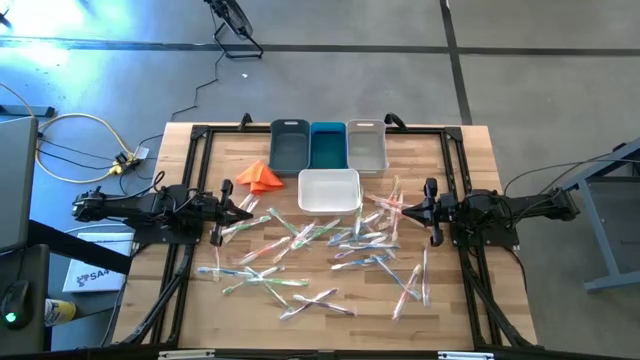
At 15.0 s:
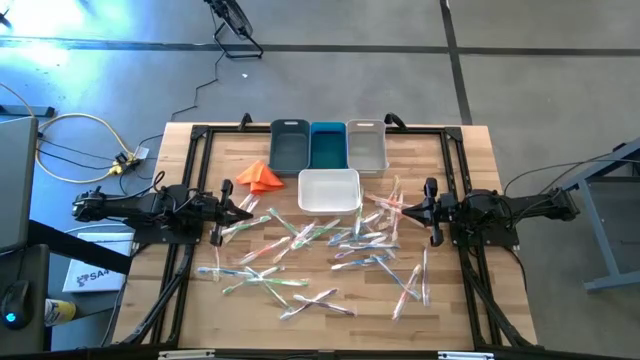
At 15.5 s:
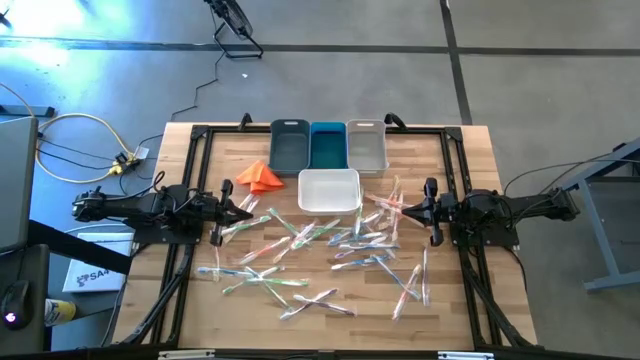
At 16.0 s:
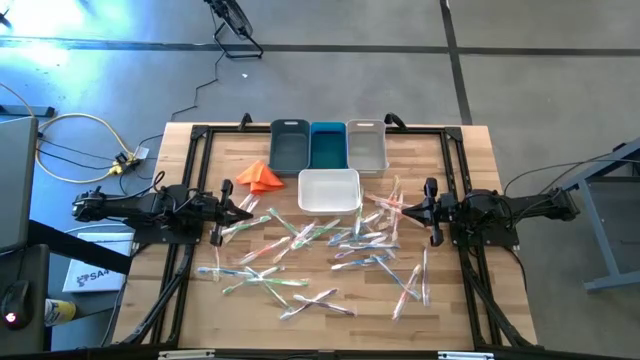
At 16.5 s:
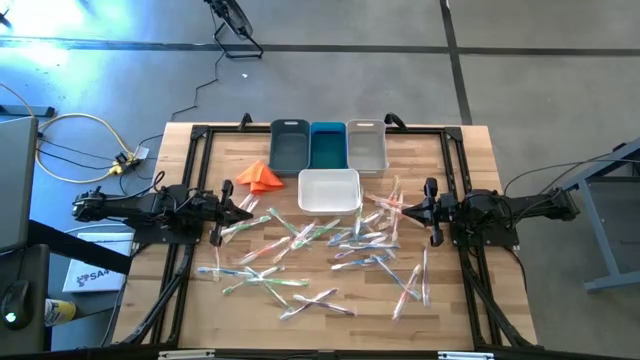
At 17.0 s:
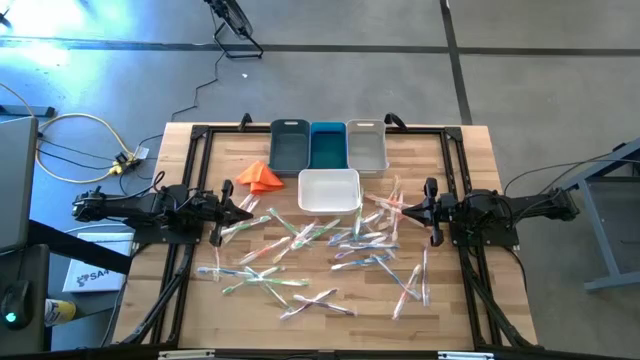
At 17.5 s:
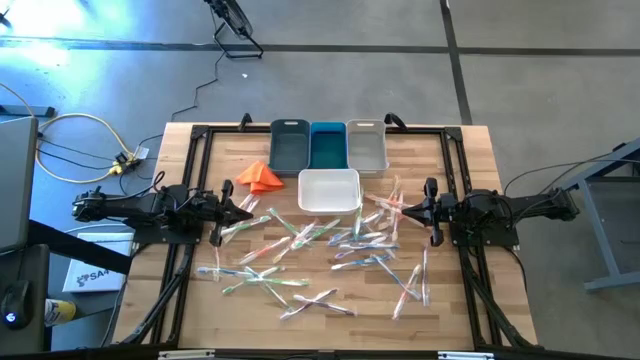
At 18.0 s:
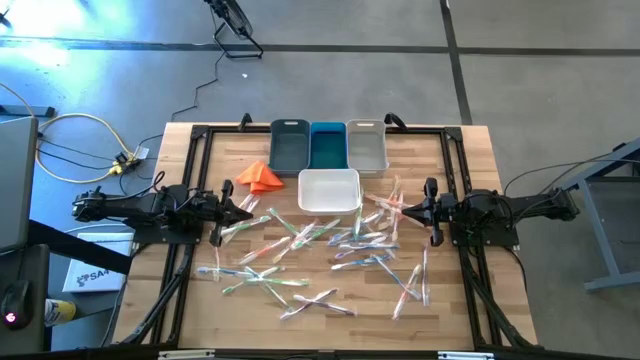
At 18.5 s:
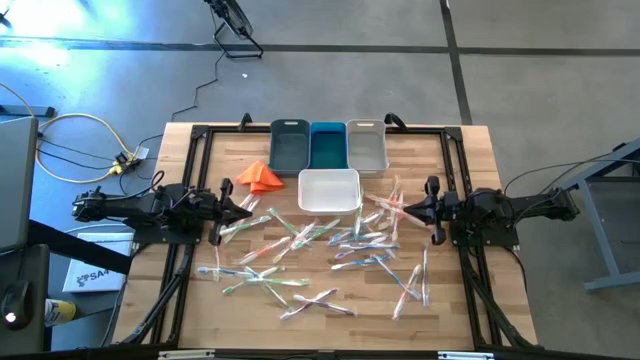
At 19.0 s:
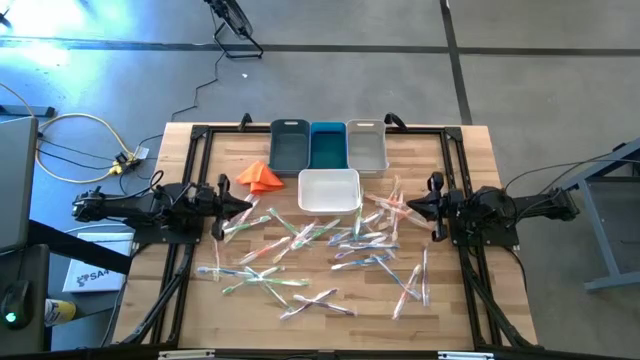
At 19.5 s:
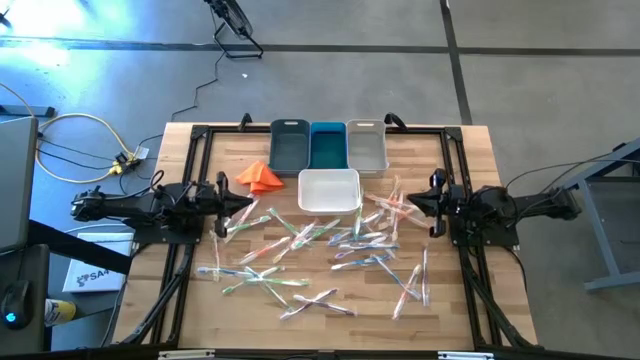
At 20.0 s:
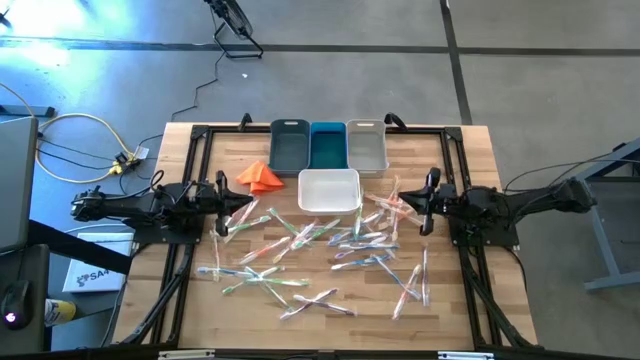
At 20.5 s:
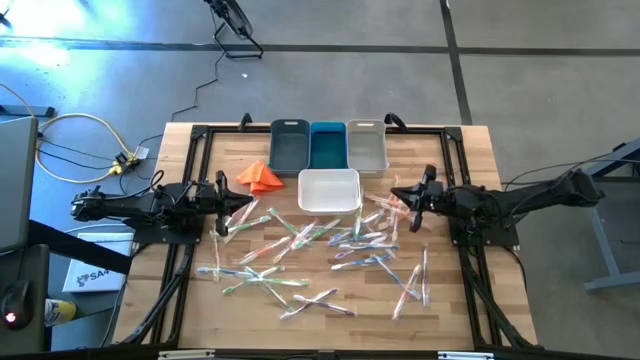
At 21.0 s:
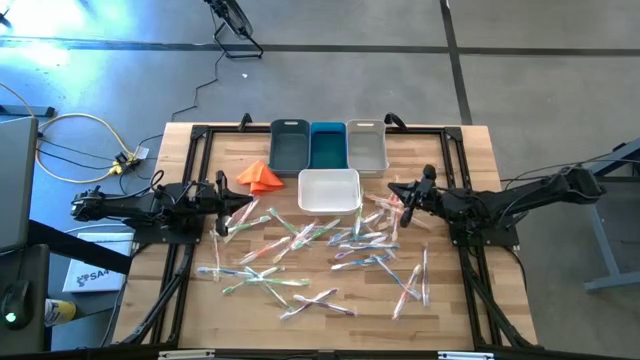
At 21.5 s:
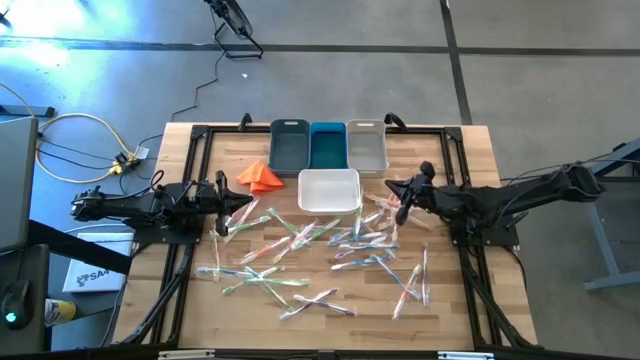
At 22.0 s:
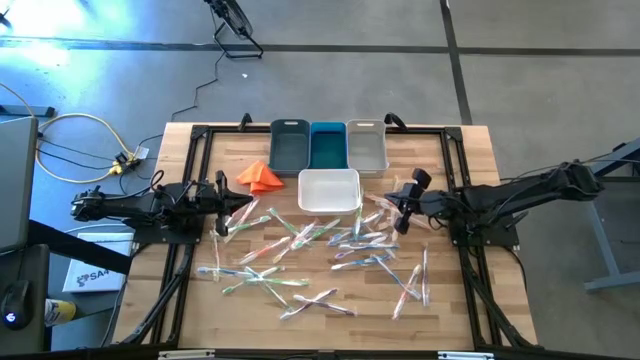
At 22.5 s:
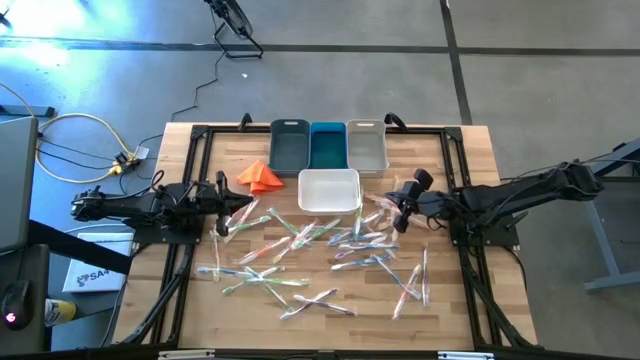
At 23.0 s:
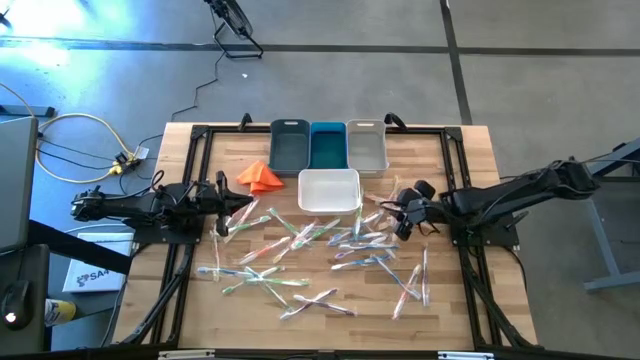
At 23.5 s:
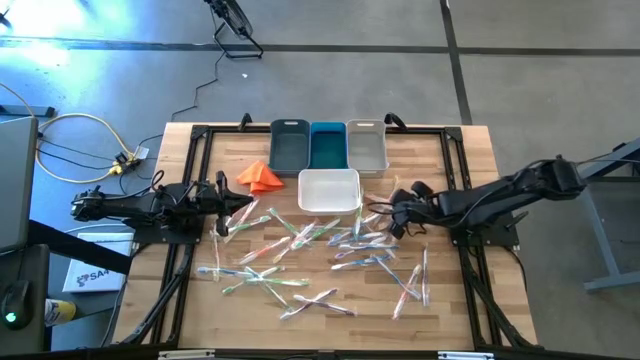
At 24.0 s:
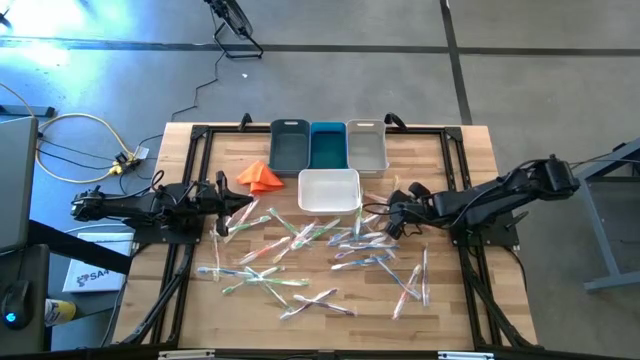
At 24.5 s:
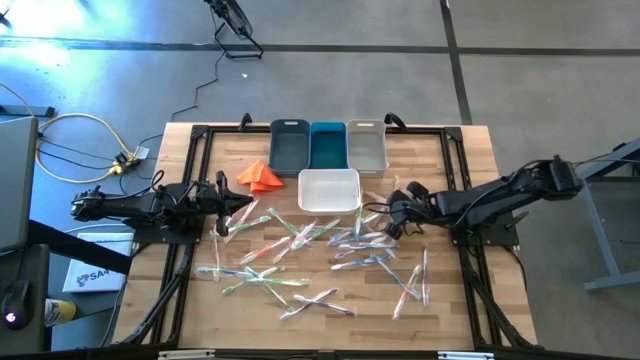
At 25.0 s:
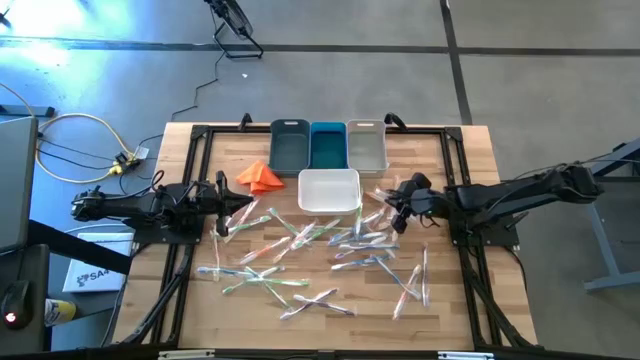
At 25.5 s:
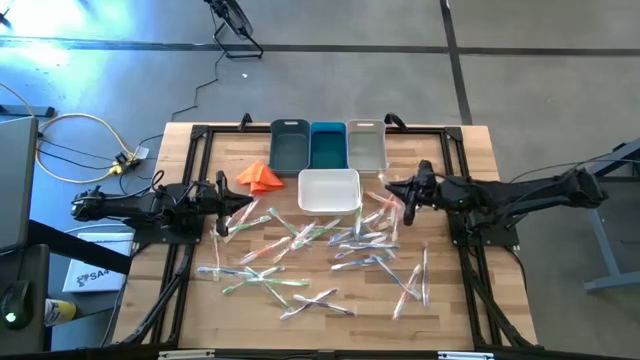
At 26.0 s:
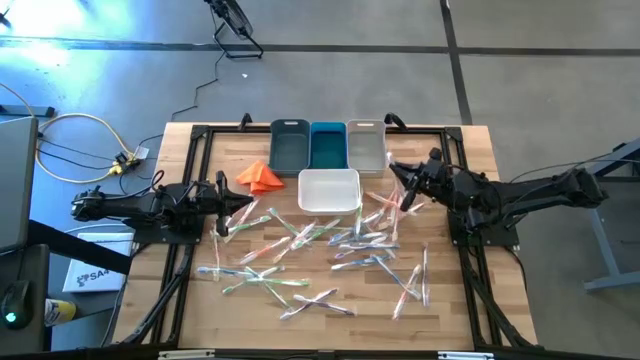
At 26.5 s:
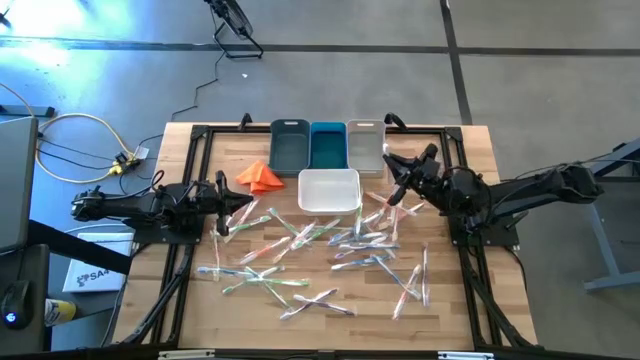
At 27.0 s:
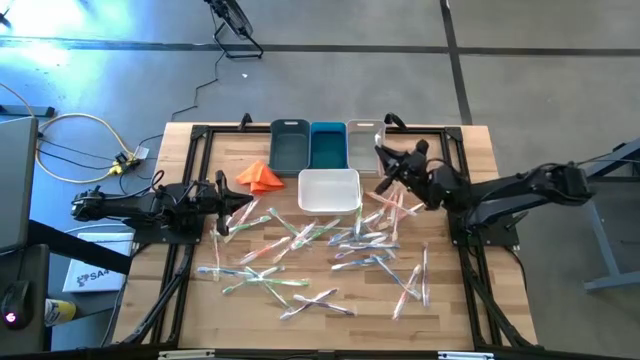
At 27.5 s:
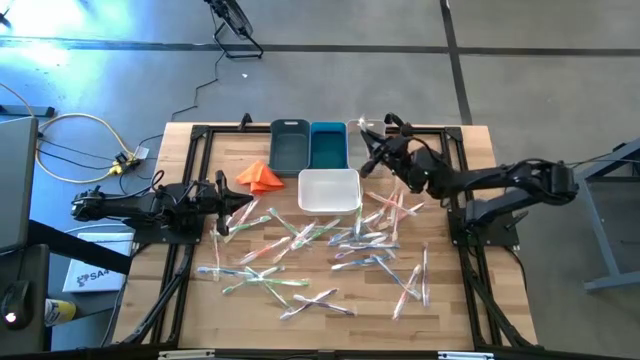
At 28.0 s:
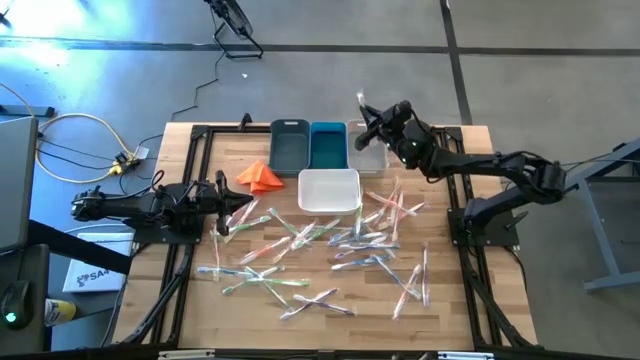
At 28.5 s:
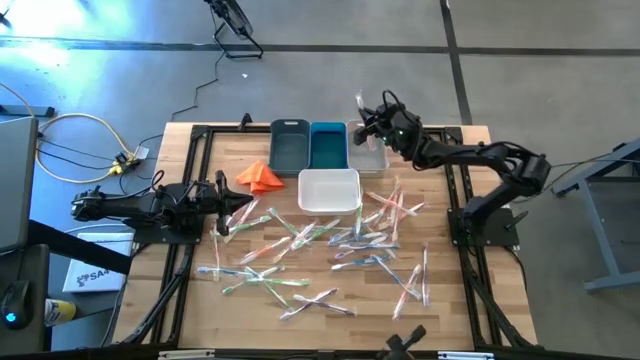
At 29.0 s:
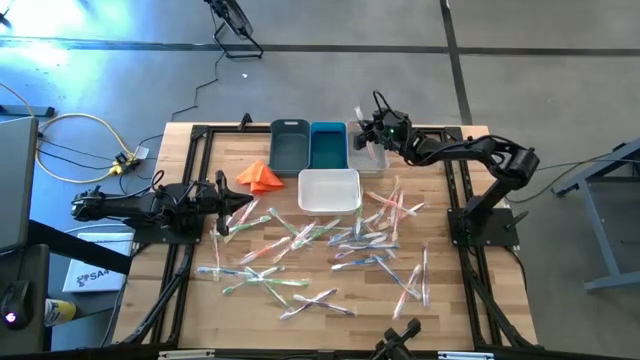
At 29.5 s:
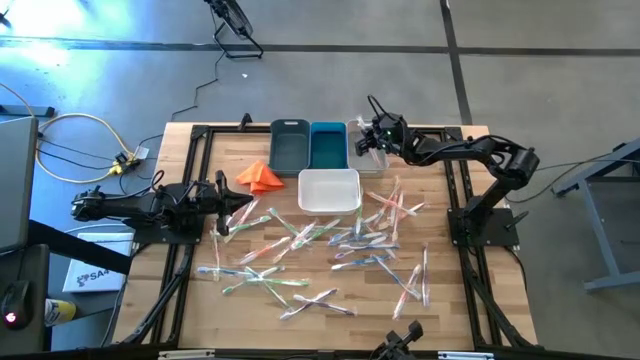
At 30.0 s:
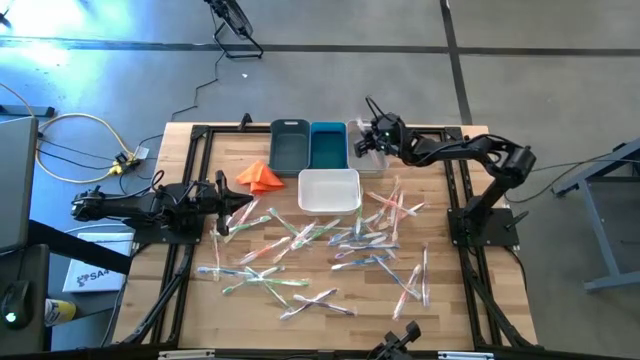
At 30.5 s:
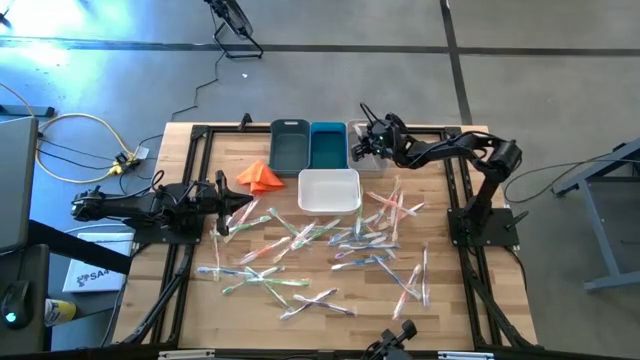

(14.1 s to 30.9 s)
Task: Pick & Place Toothbrushes
Put the orange toothbrush into the gray bin

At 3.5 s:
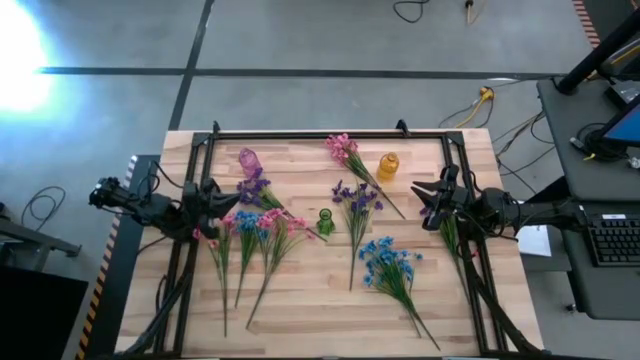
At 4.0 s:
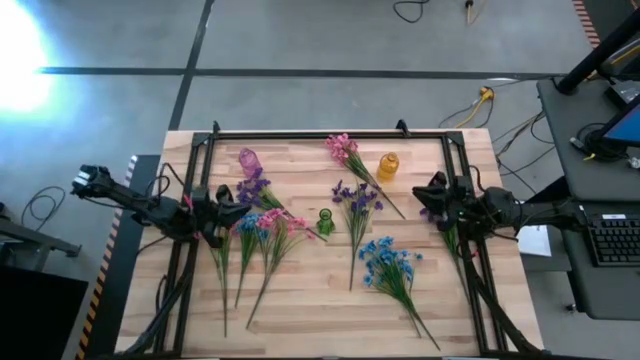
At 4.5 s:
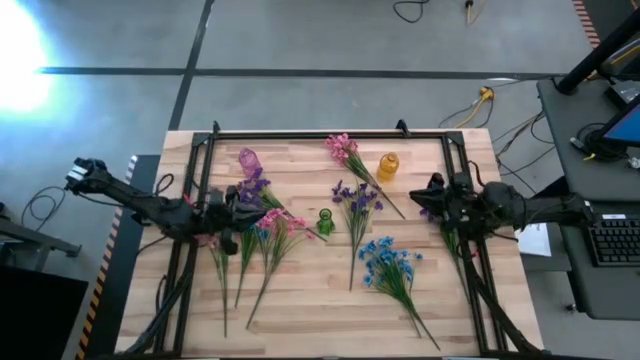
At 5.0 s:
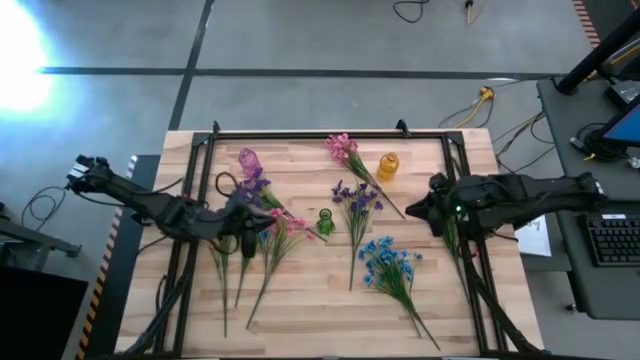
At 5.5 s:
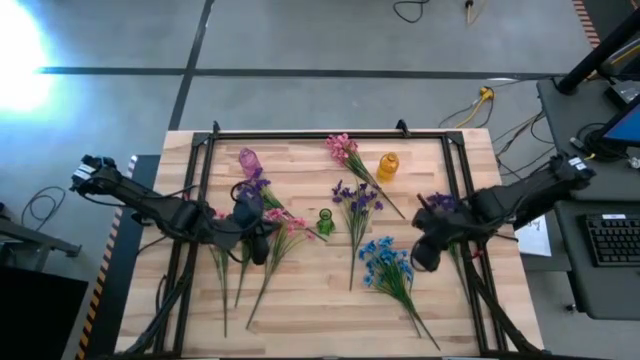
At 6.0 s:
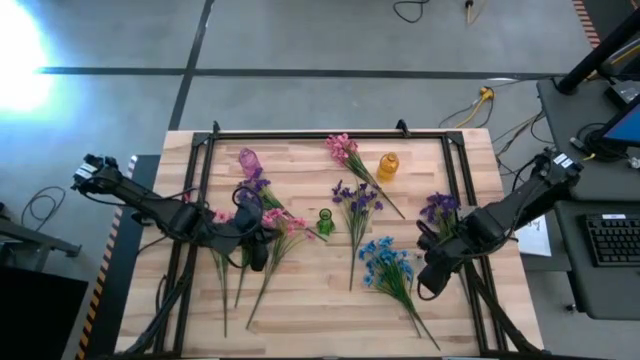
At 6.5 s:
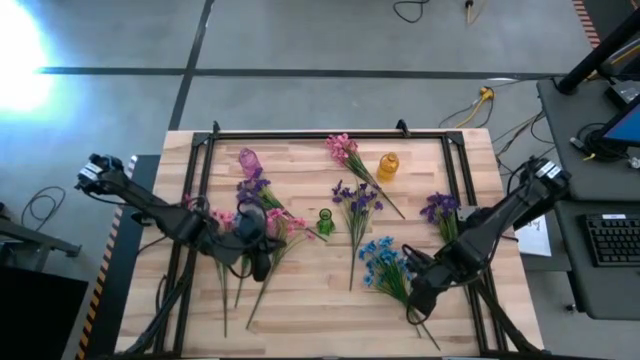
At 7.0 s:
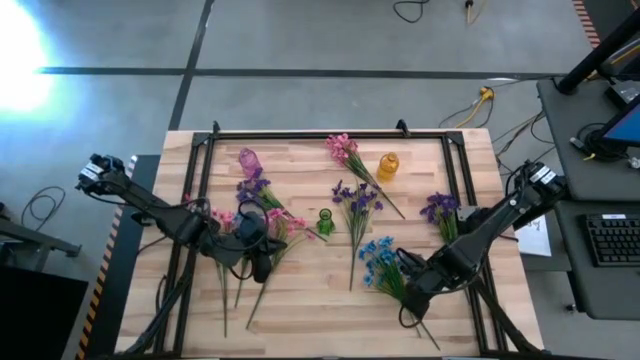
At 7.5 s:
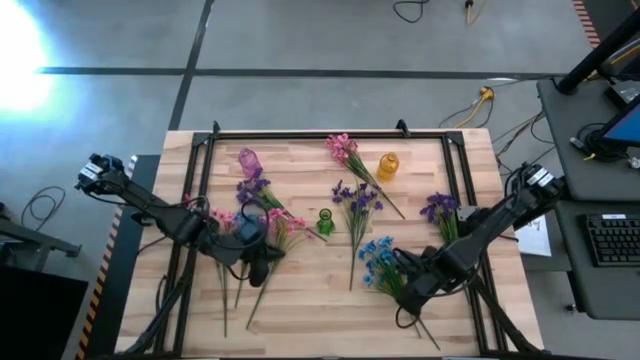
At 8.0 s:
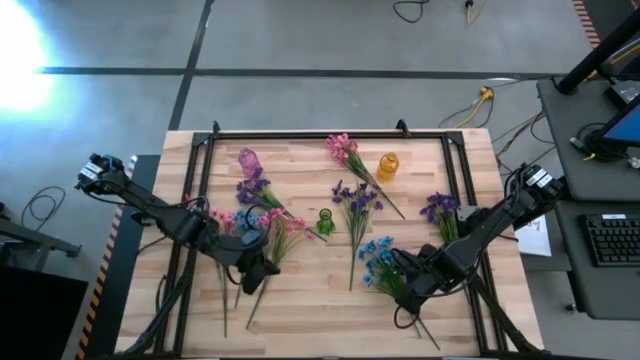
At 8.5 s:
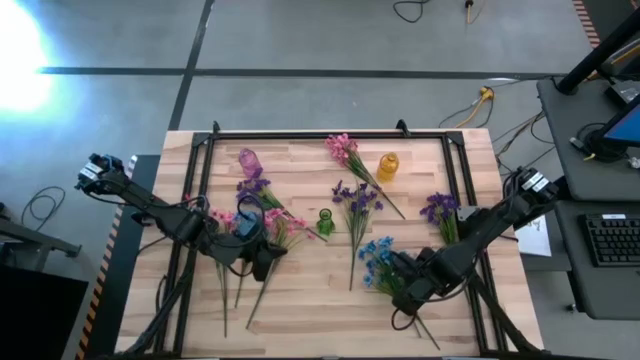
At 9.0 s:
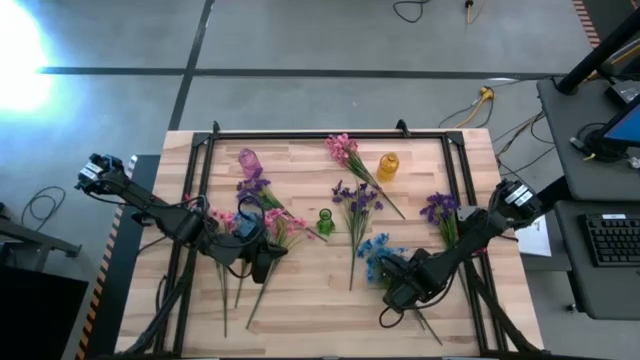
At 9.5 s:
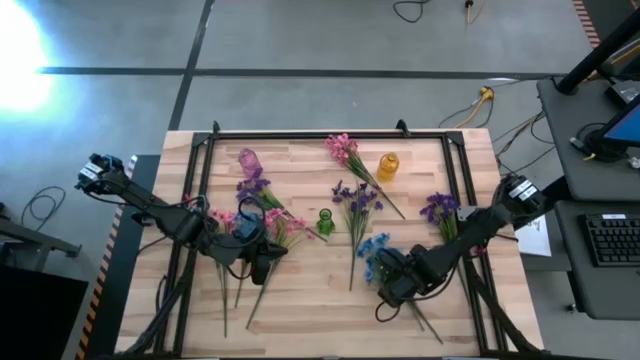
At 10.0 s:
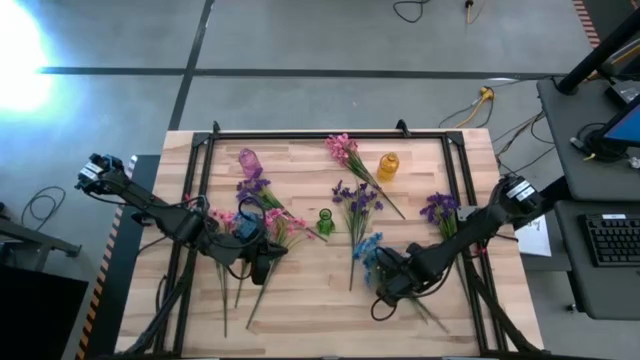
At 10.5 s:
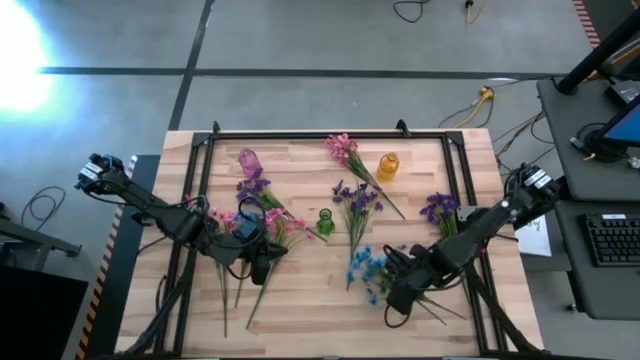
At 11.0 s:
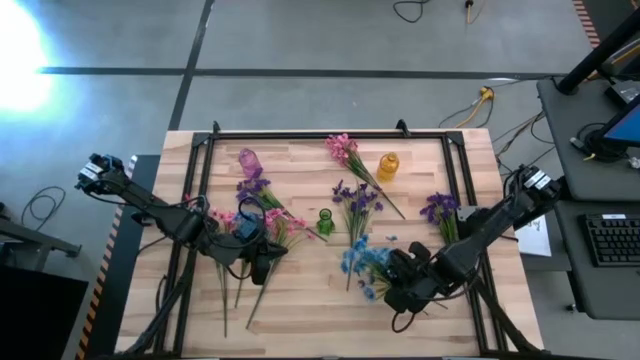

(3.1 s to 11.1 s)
Task: Sort flowers into vase by color
Put the bottom blue flowers into the green vase
